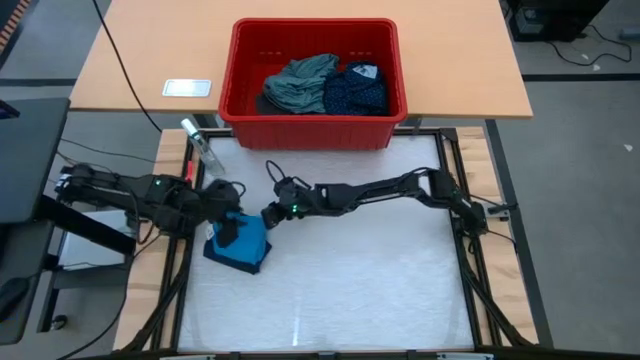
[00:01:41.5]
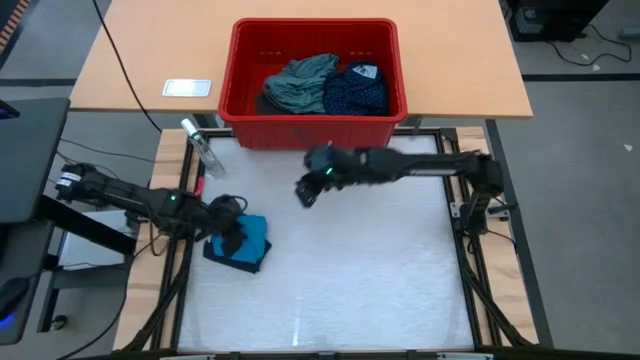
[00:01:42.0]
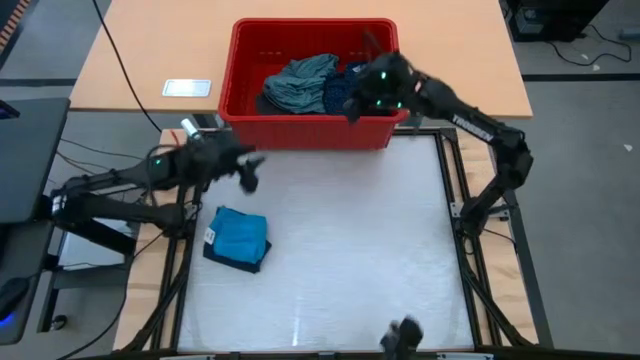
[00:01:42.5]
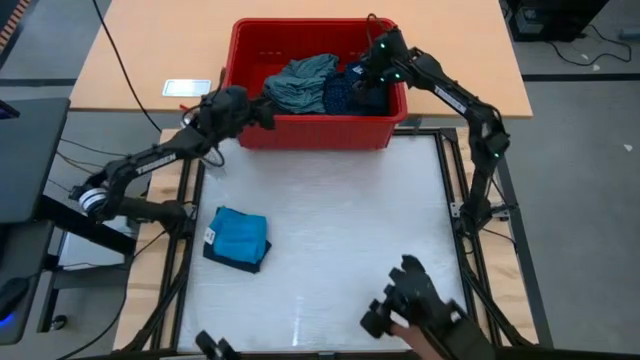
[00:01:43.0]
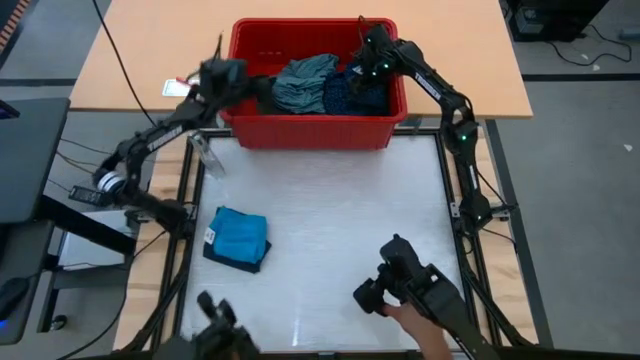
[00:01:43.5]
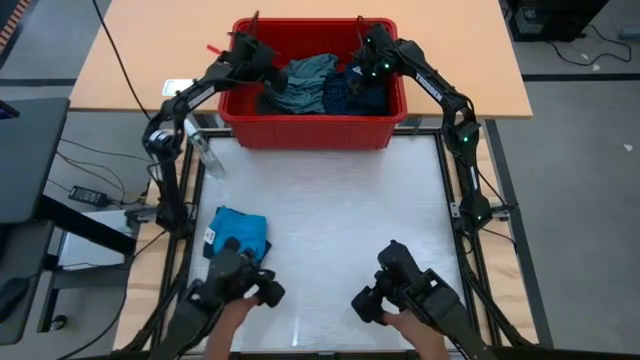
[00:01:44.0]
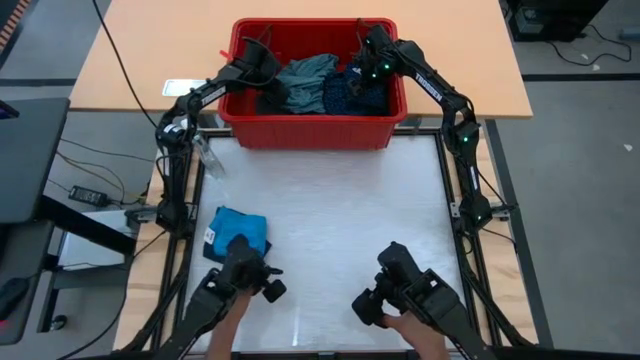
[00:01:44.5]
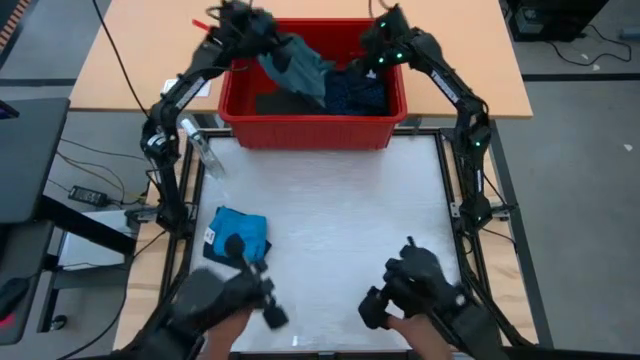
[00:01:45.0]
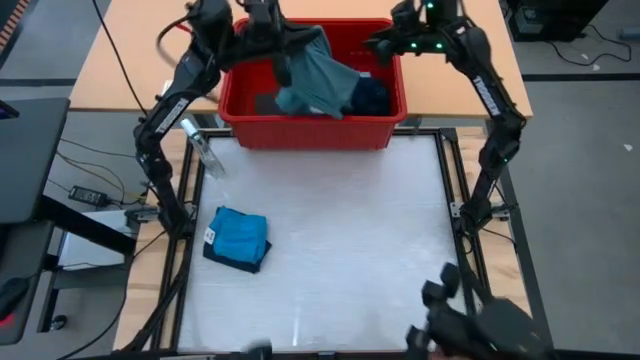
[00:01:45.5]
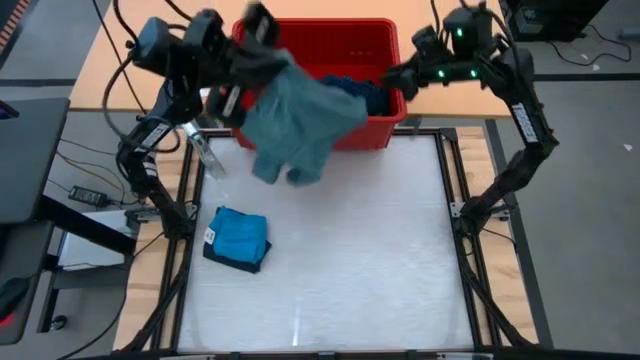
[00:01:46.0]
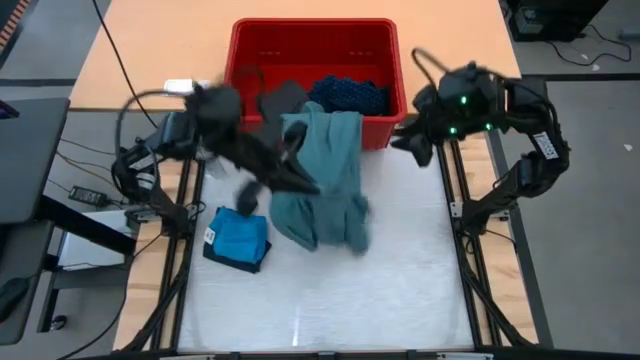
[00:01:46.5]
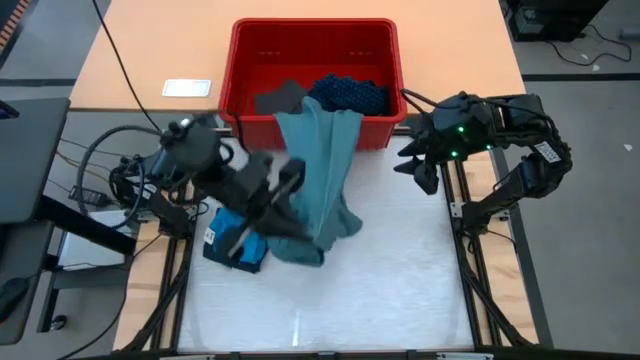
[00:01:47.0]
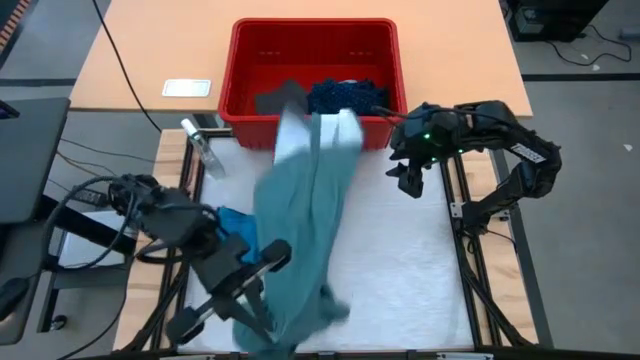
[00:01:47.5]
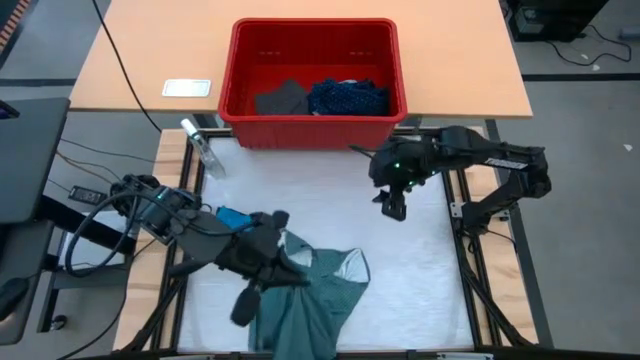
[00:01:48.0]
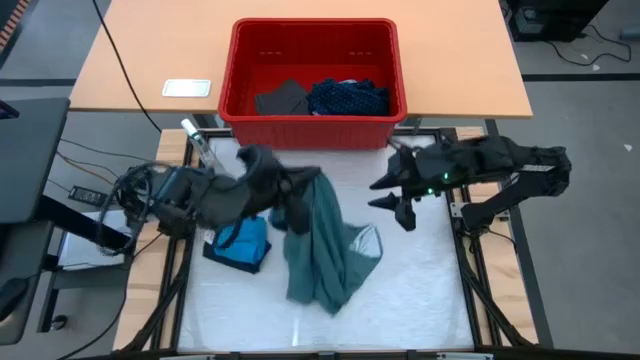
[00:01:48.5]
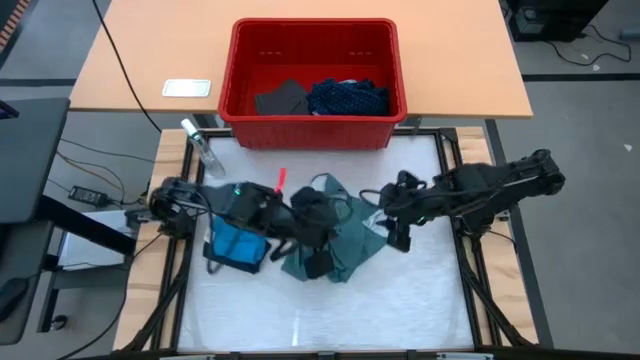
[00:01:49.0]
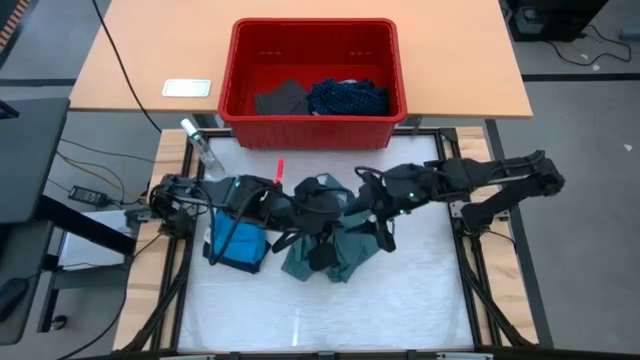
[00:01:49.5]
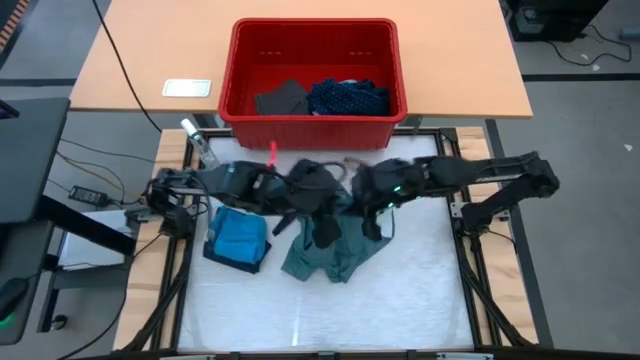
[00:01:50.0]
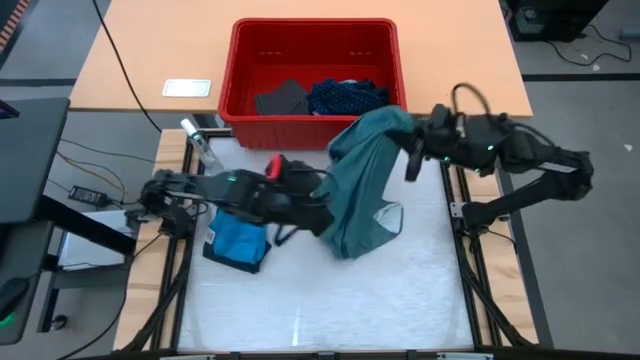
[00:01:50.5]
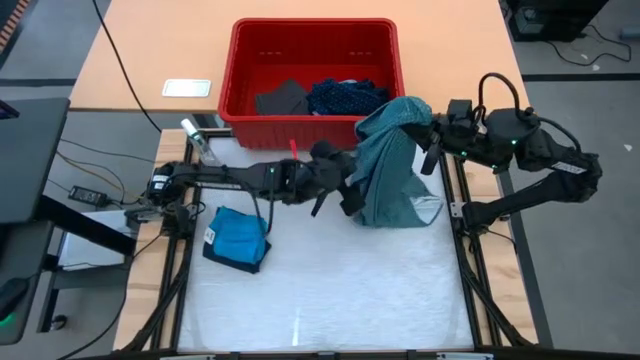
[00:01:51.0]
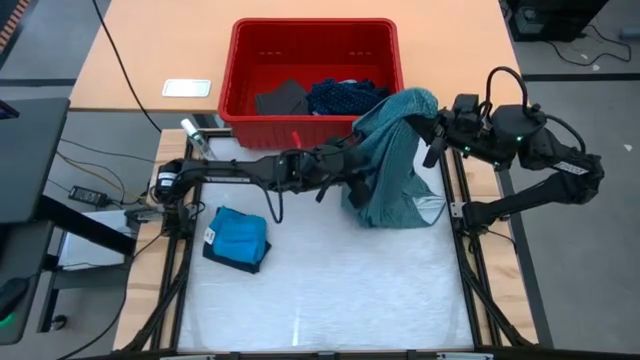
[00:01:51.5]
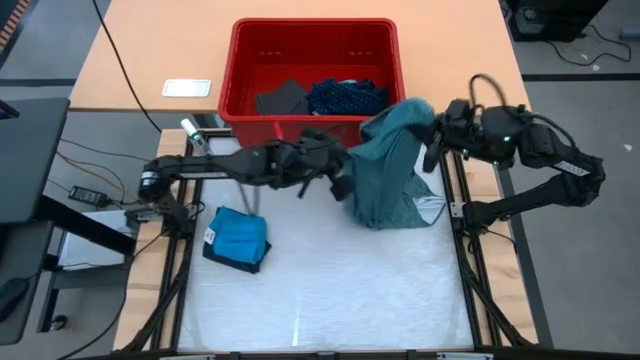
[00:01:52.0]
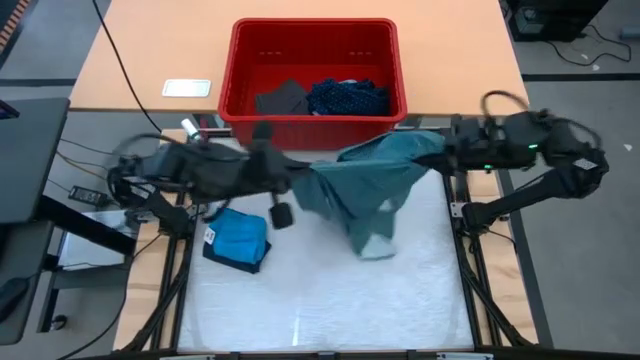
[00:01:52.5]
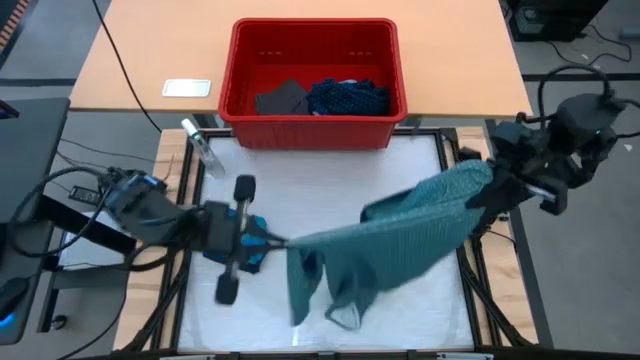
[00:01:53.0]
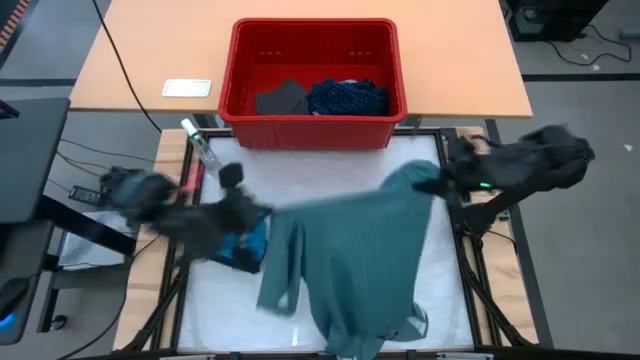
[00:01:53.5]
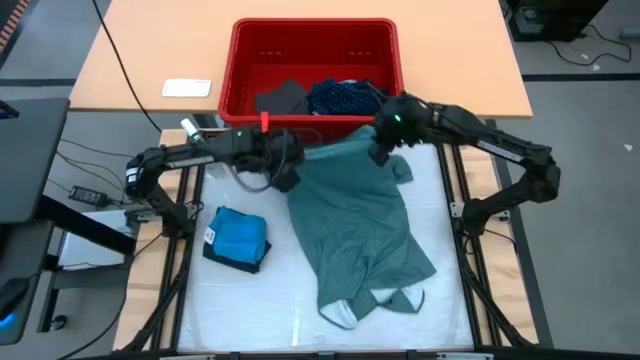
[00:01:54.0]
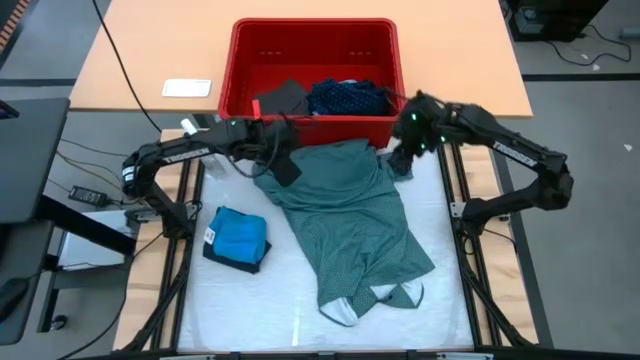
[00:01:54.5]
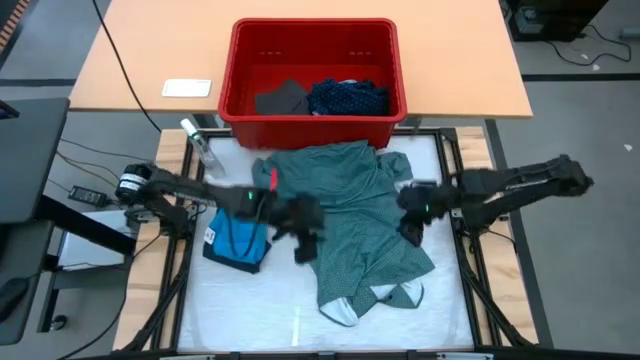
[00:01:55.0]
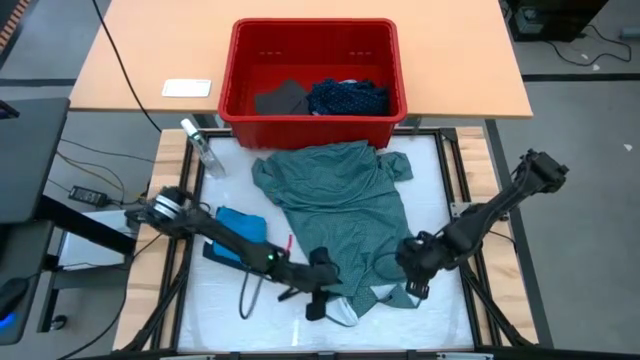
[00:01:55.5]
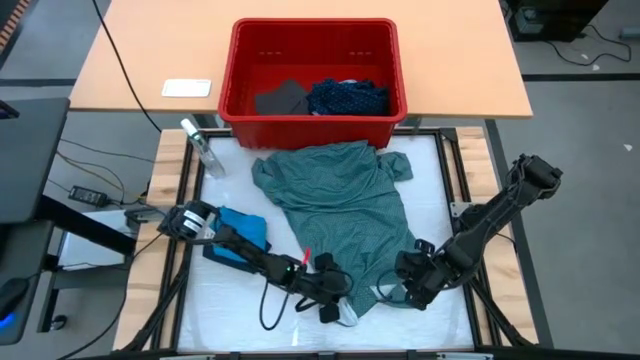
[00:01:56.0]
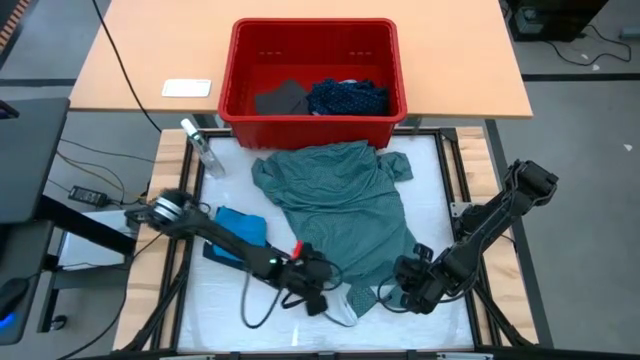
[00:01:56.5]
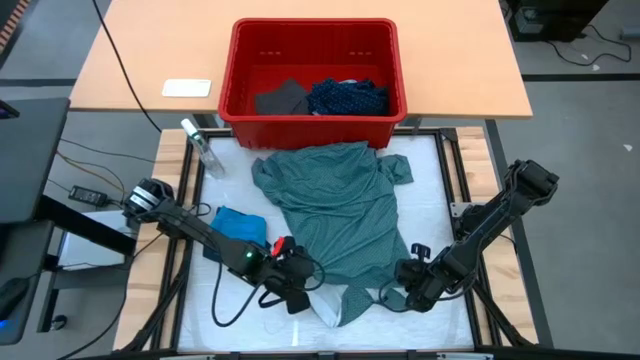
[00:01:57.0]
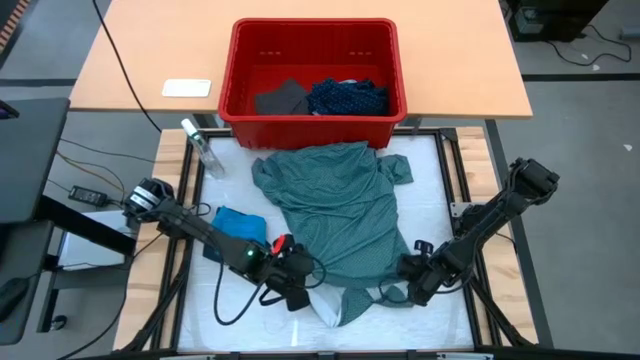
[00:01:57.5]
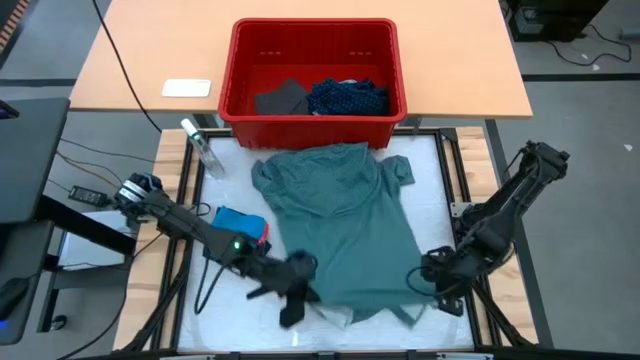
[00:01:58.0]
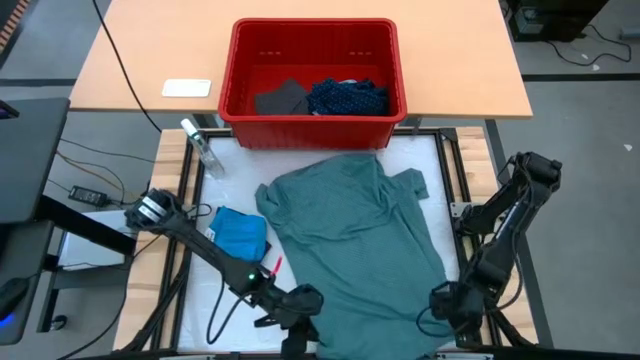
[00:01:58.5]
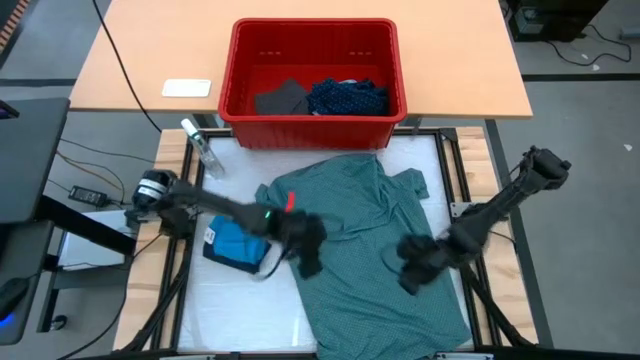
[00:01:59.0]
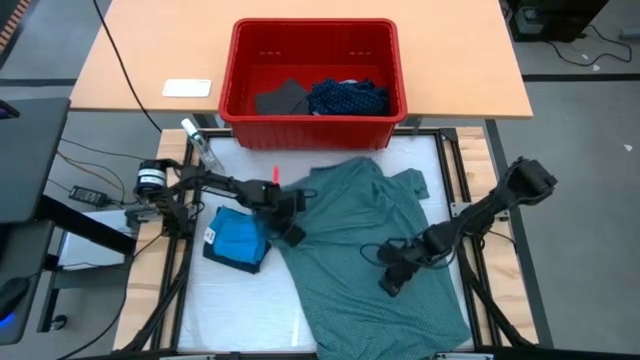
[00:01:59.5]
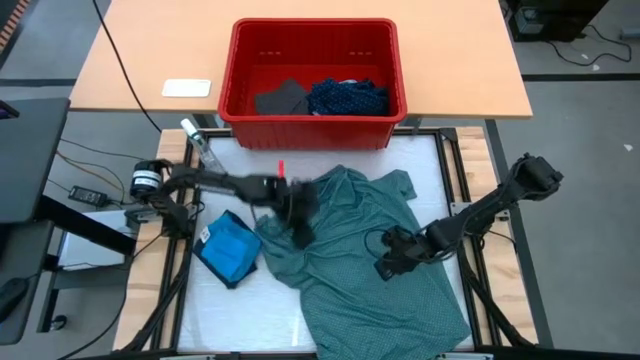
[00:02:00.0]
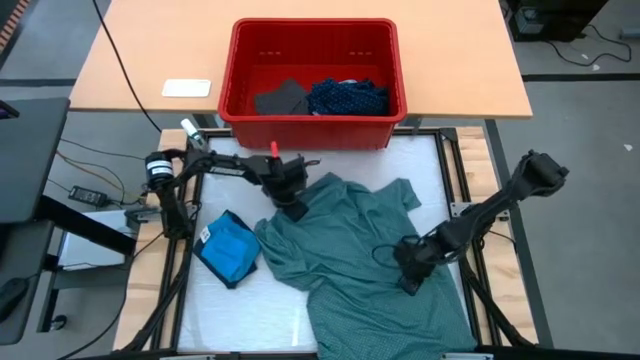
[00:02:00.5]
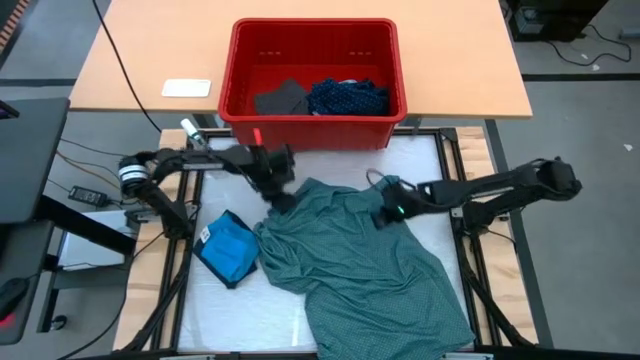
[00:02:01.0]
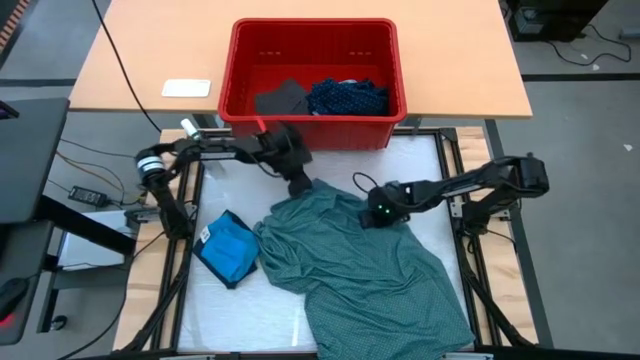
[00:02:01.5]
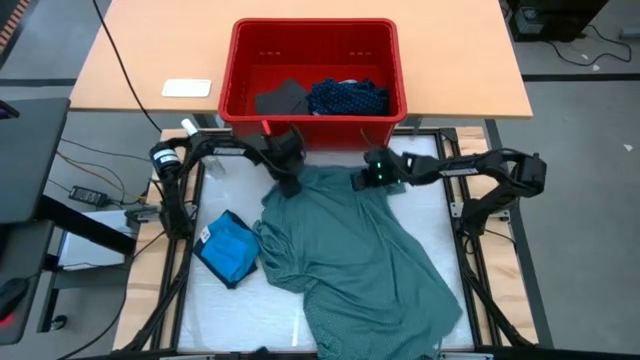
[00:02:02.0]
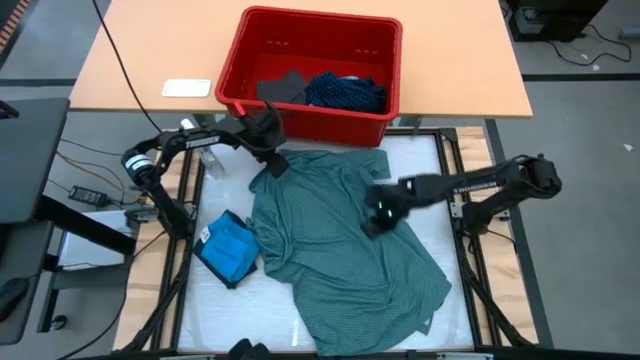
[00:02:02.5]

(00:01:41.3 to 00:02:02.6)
Task: Fold laundry
Fold the green polo shirt
